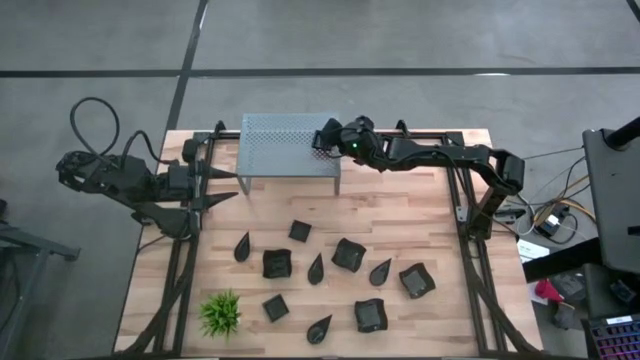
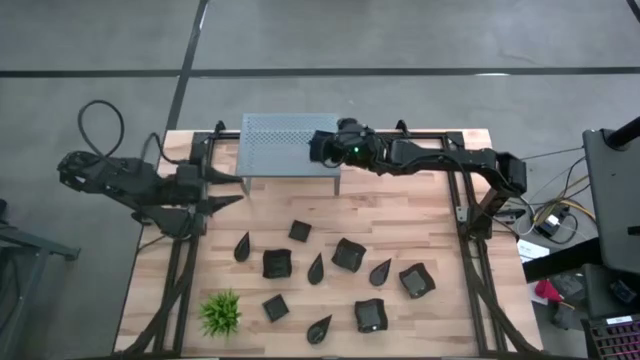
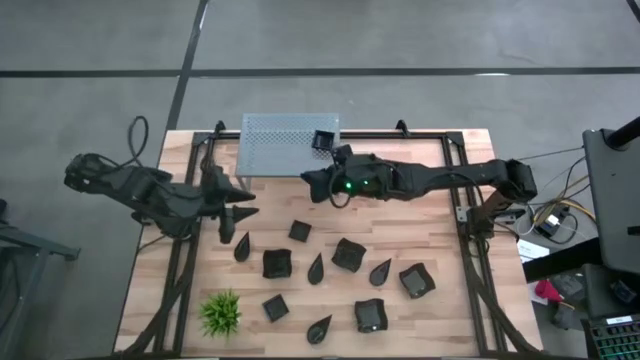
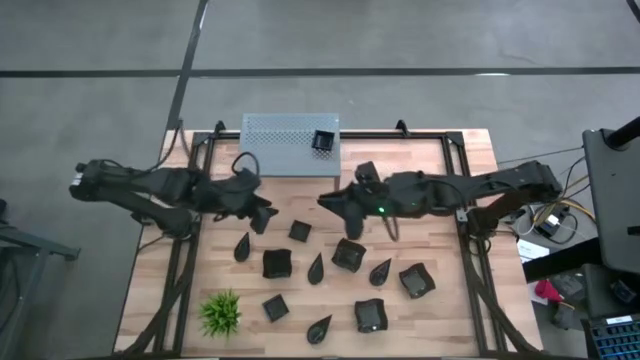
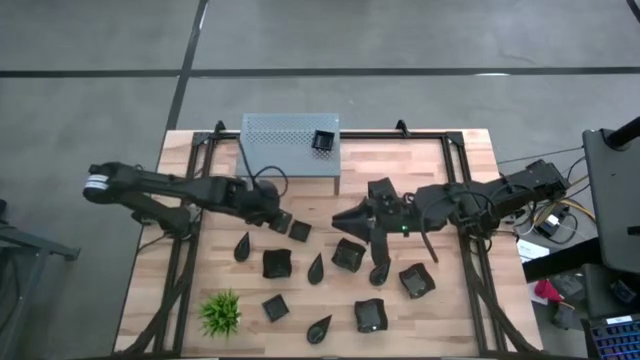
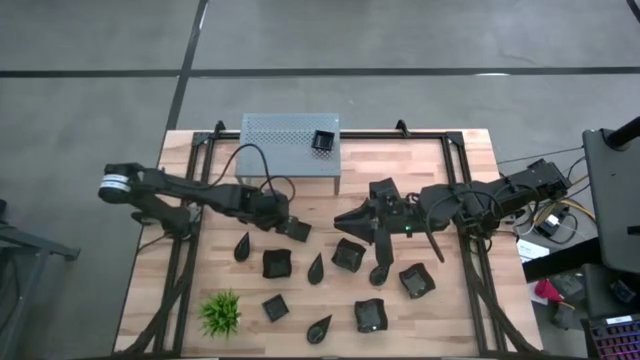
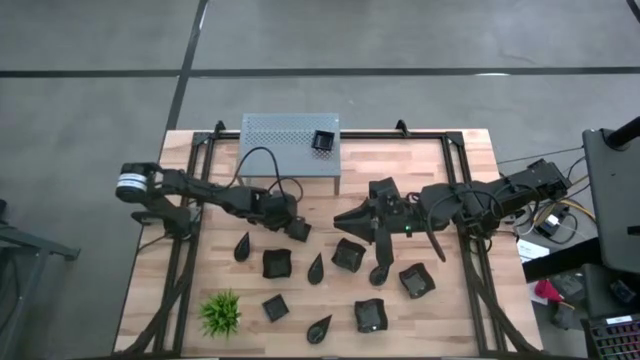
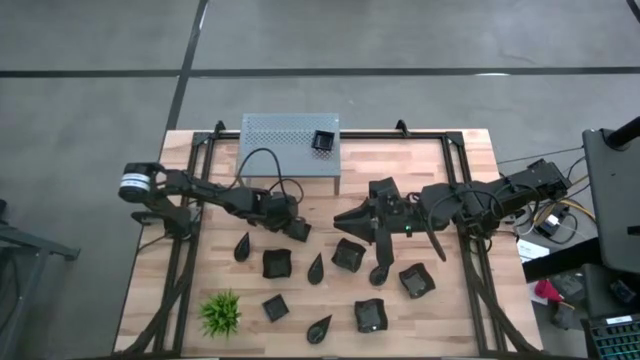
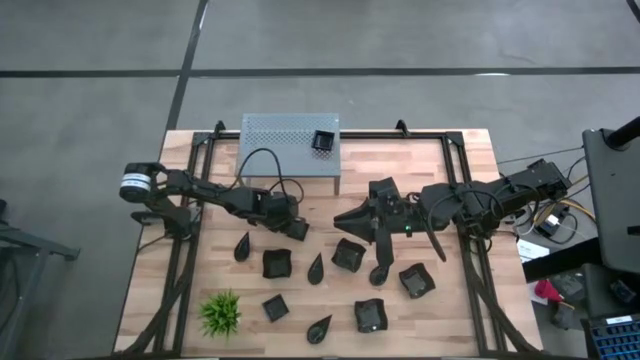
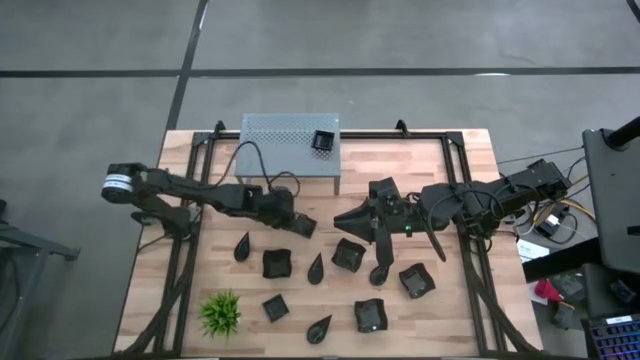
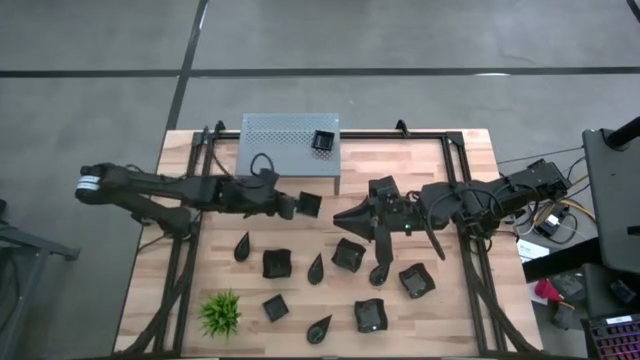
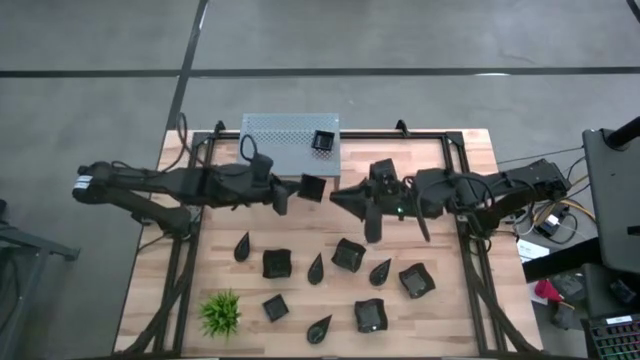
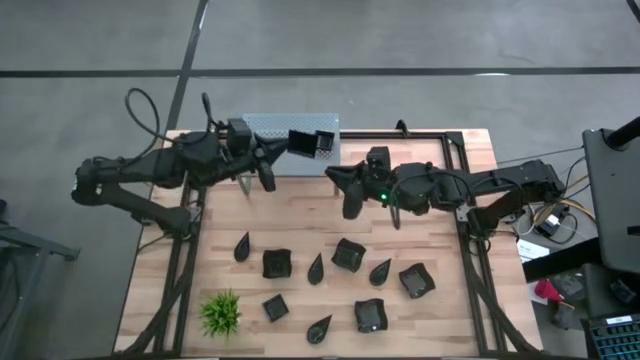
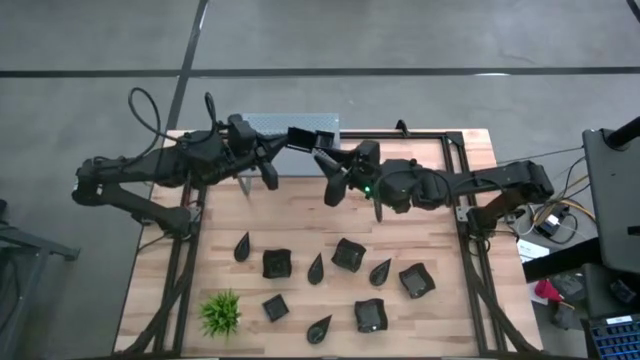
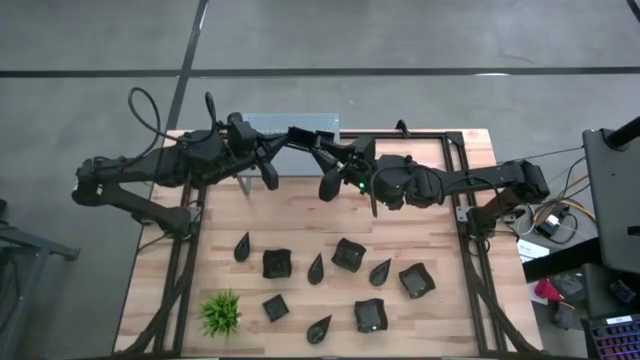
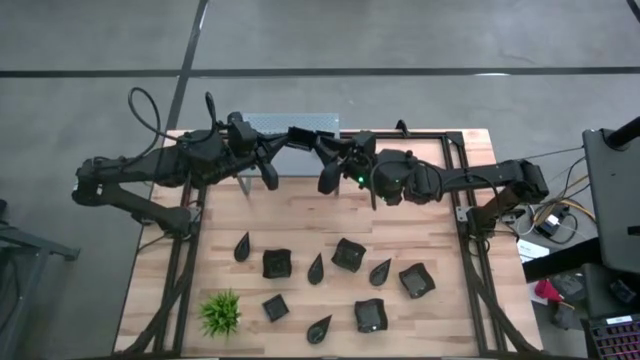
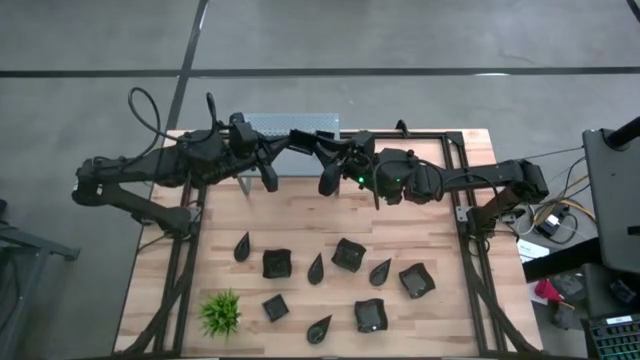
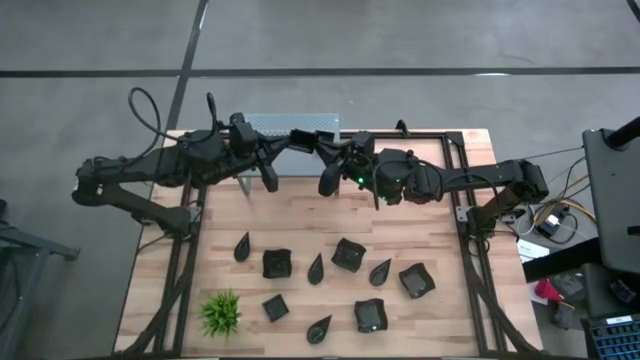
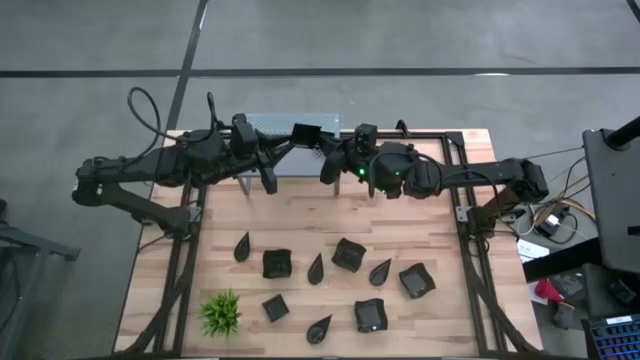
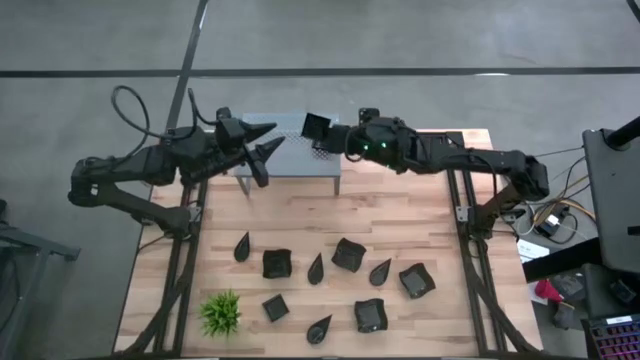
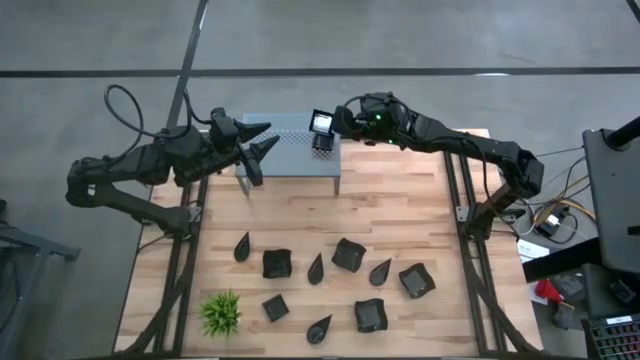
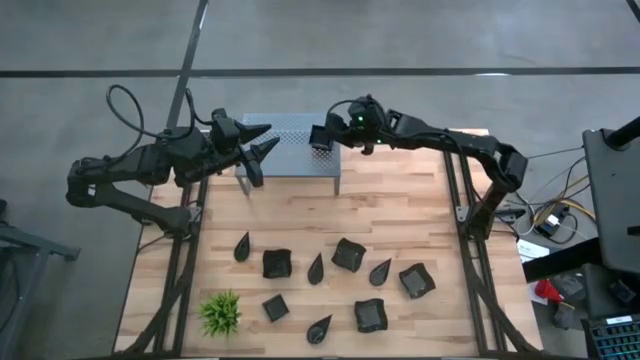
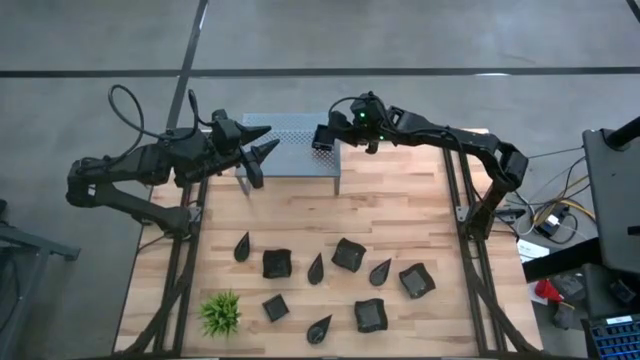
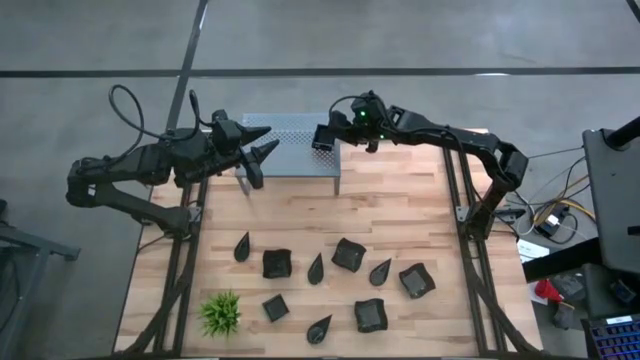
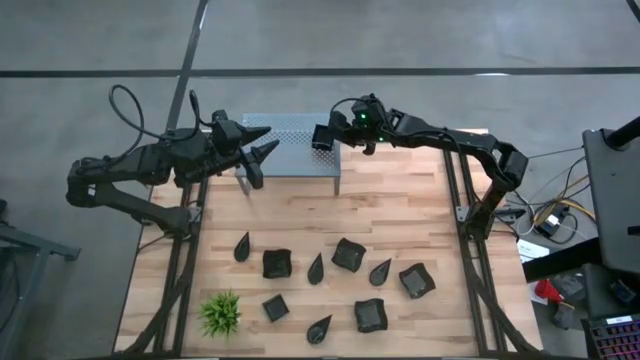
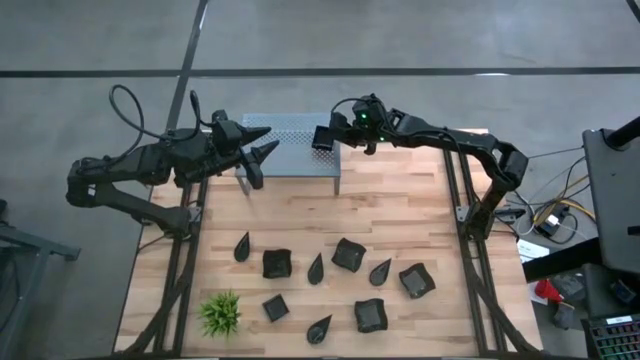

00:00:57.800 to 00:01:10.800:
Task: Pick & Place Mini shaped plates
Stack the square plate on top of the other square plates on the shelf

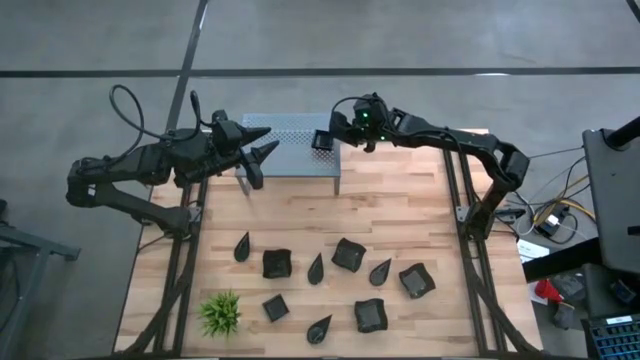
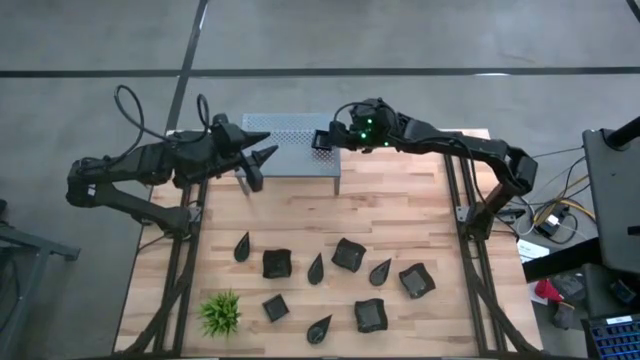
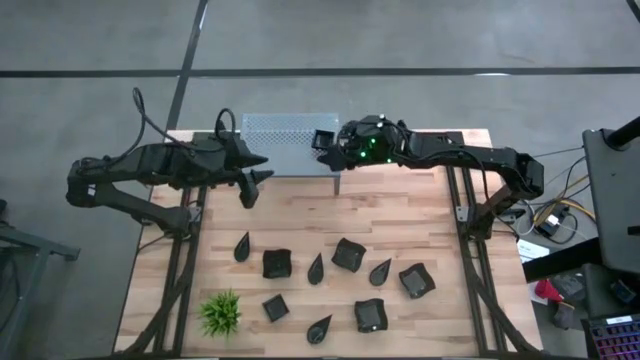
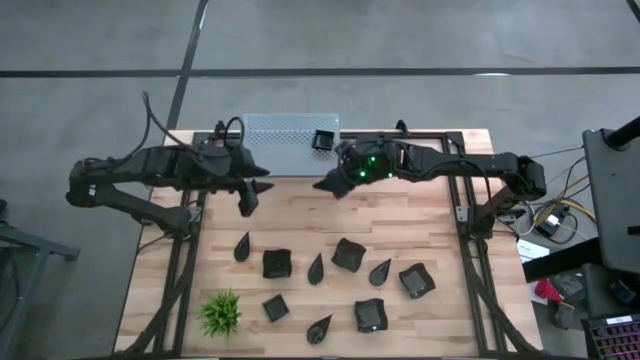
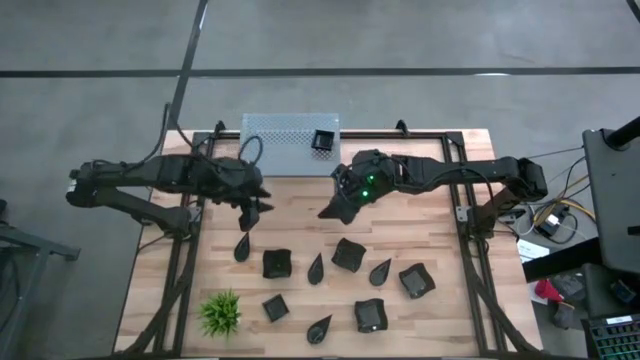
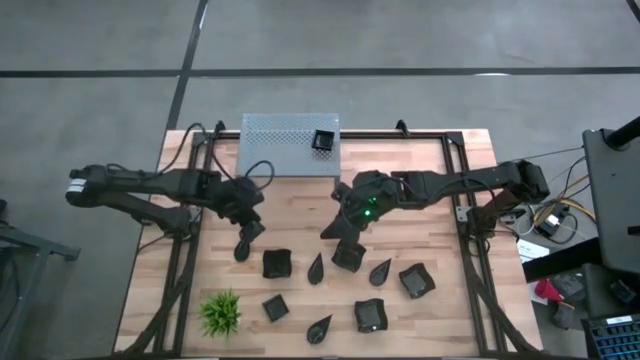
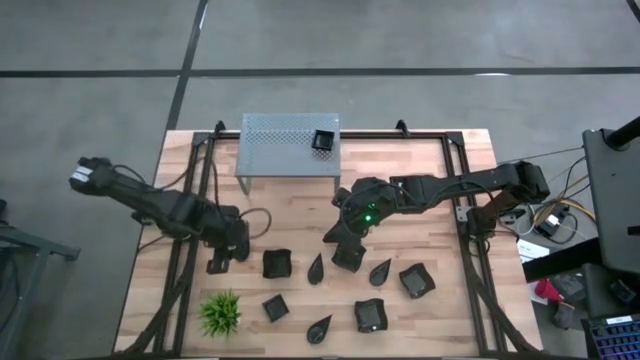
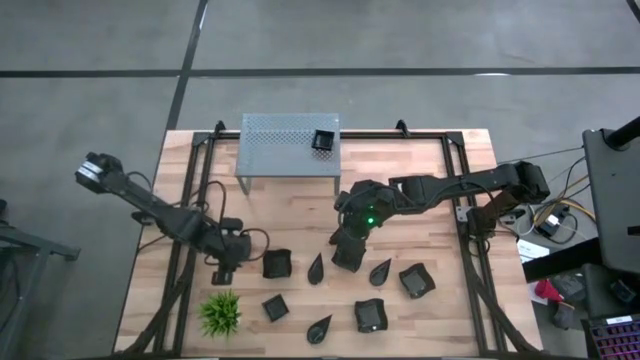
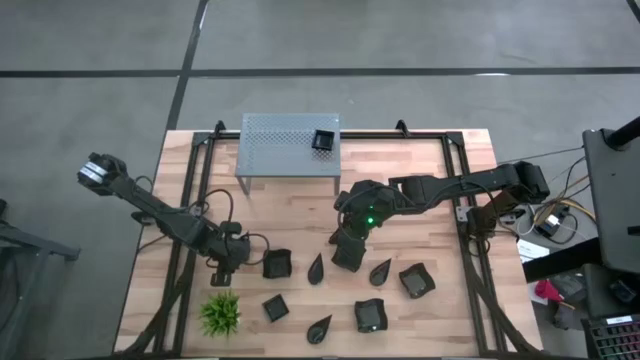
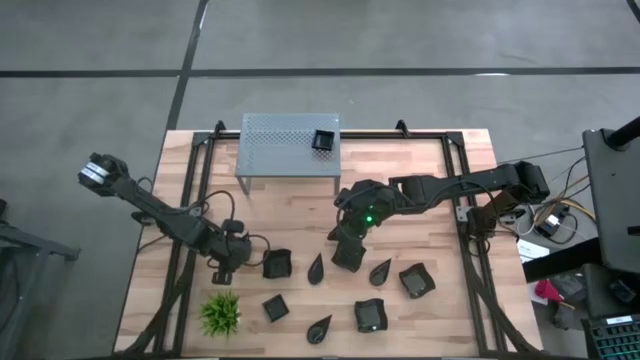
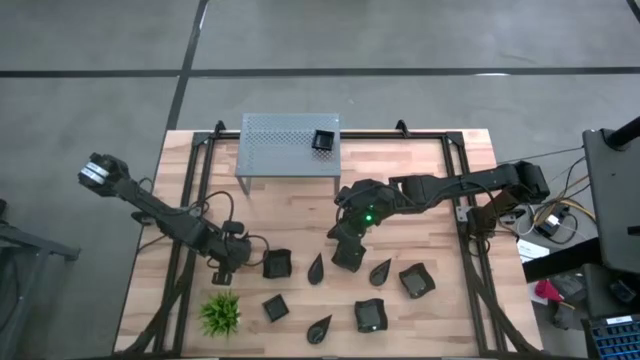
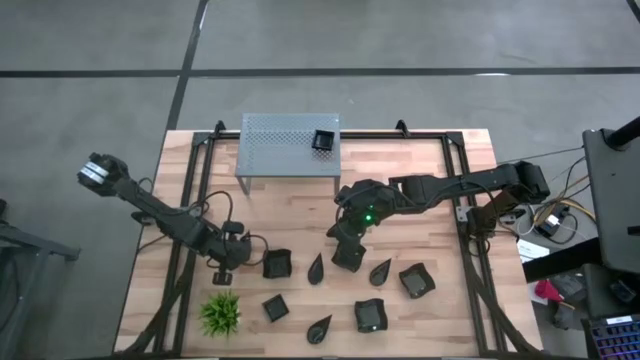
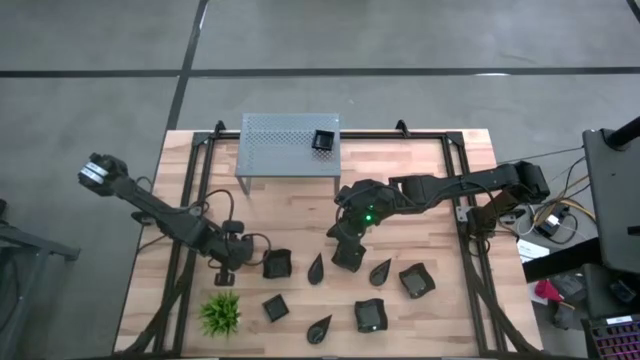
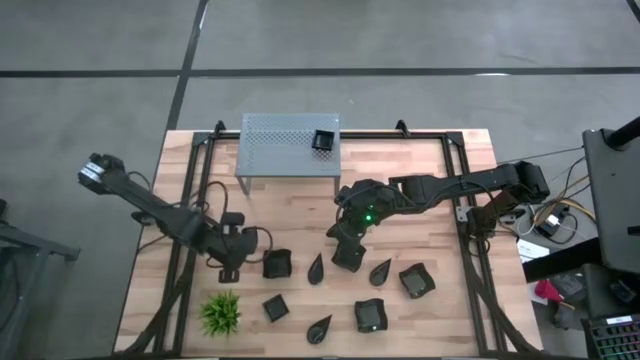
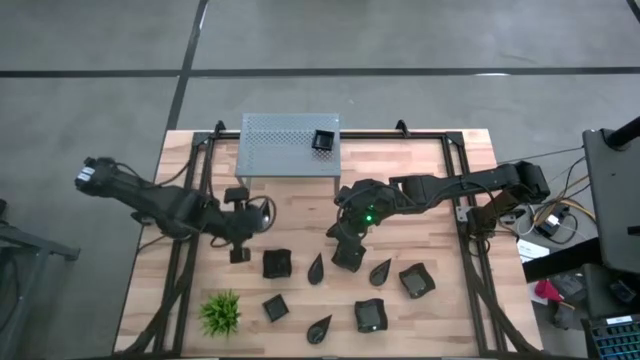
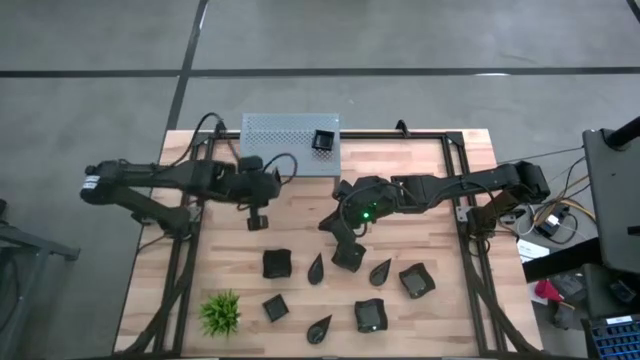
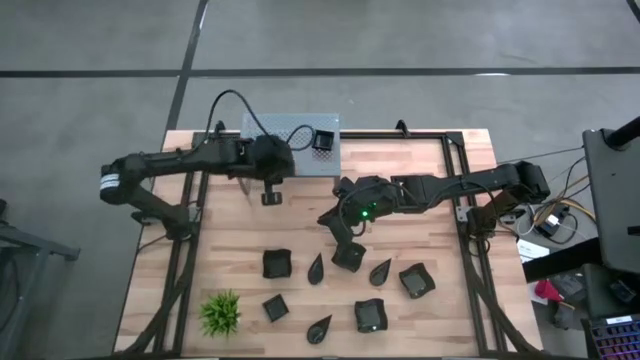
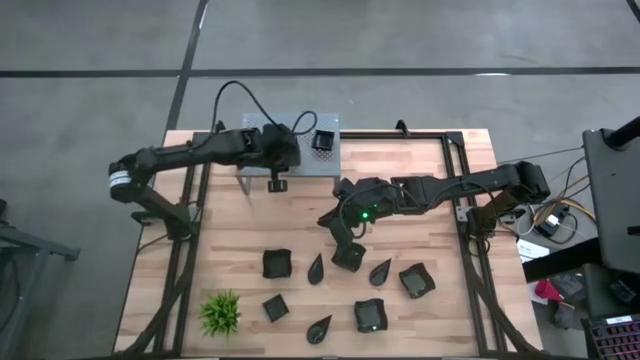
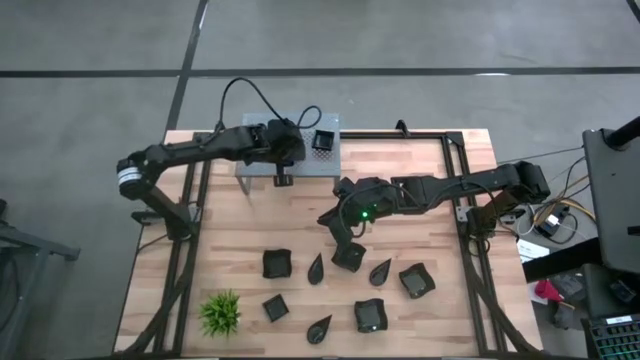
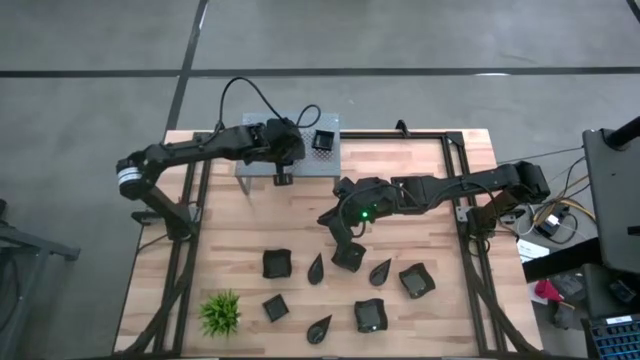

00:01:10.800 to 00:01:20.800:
Put the right drop-shaped plate on the middle shelf
